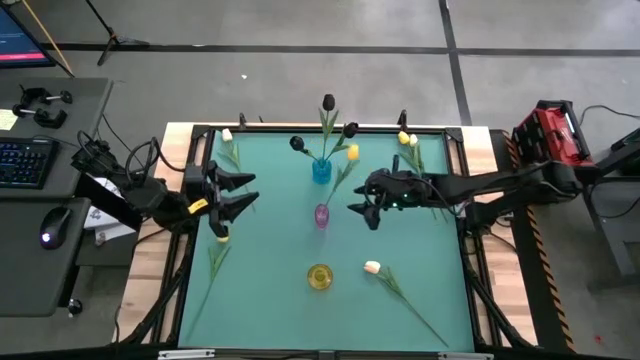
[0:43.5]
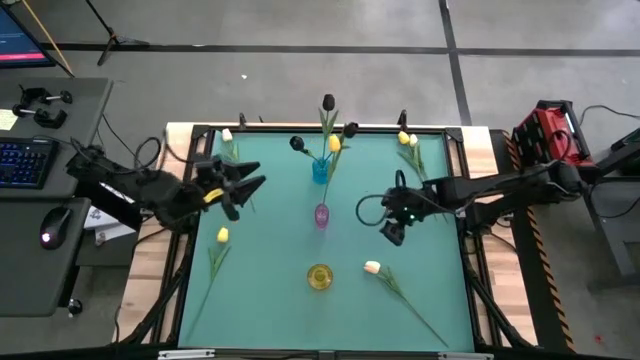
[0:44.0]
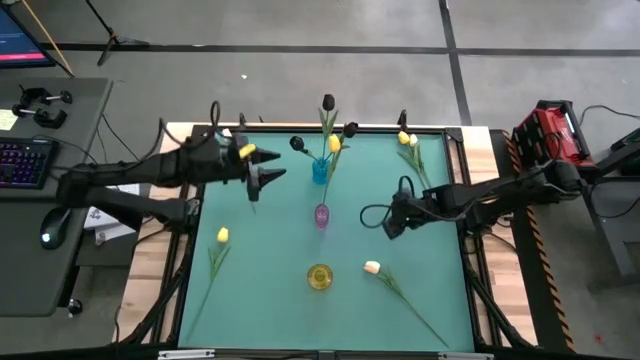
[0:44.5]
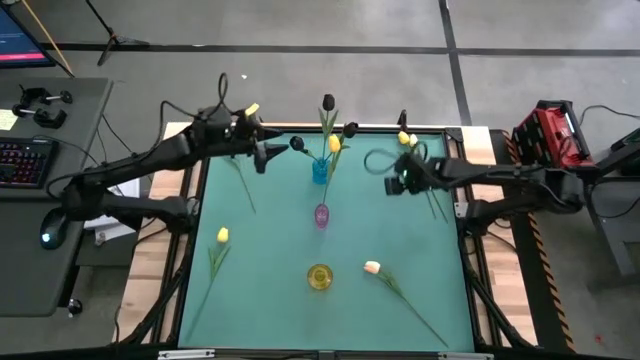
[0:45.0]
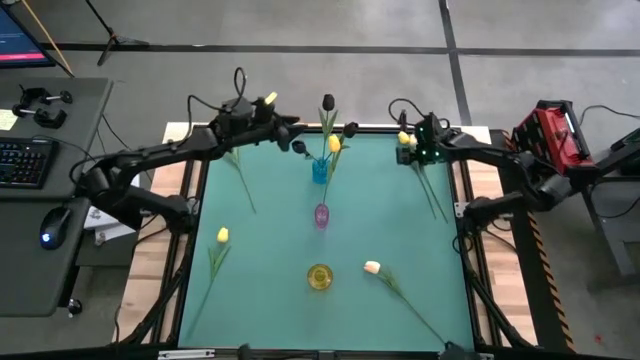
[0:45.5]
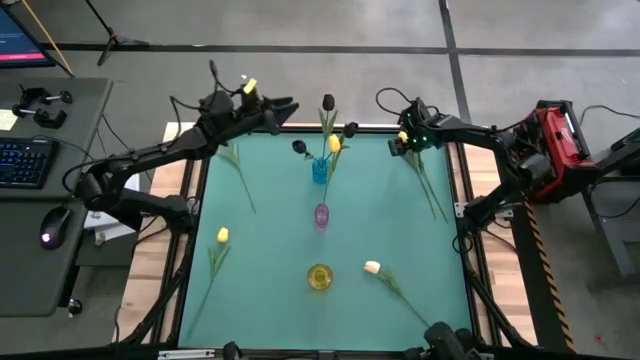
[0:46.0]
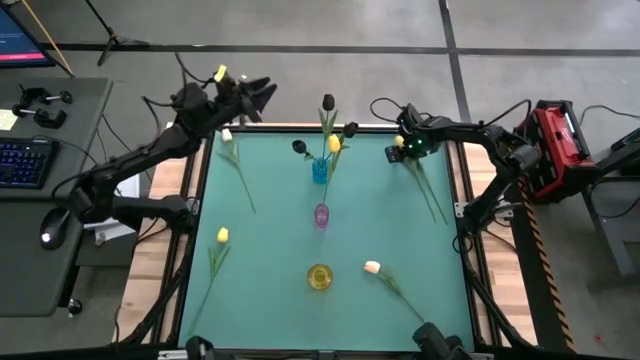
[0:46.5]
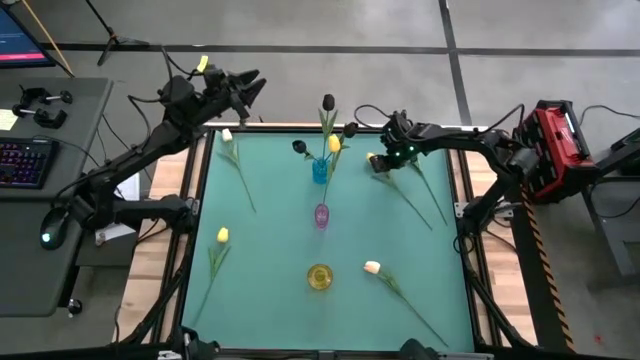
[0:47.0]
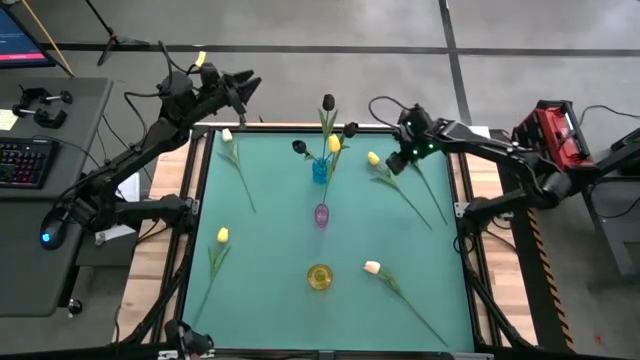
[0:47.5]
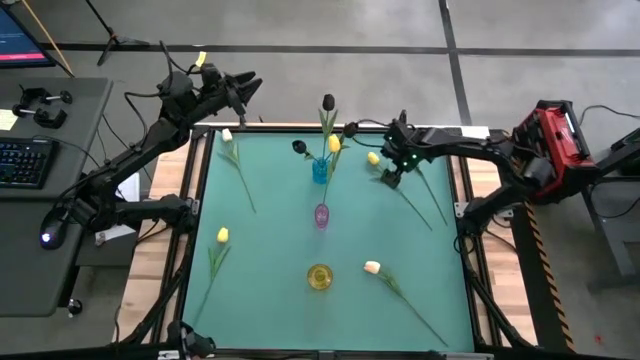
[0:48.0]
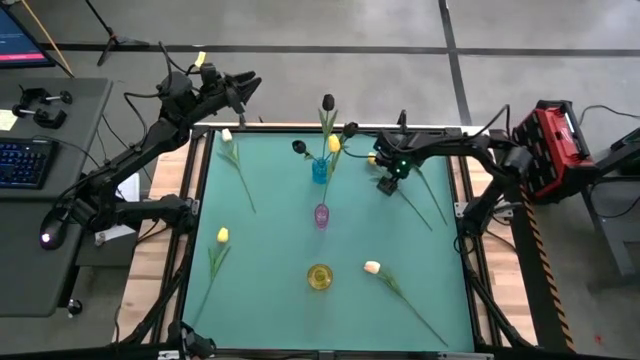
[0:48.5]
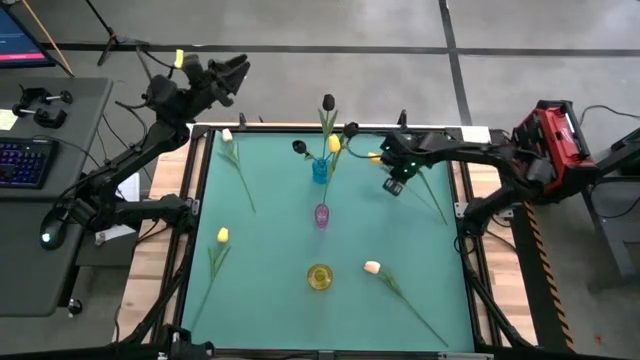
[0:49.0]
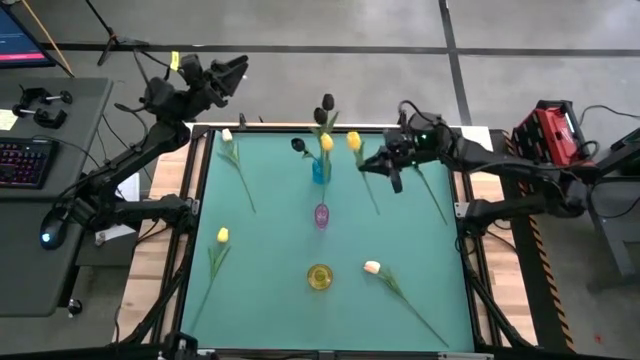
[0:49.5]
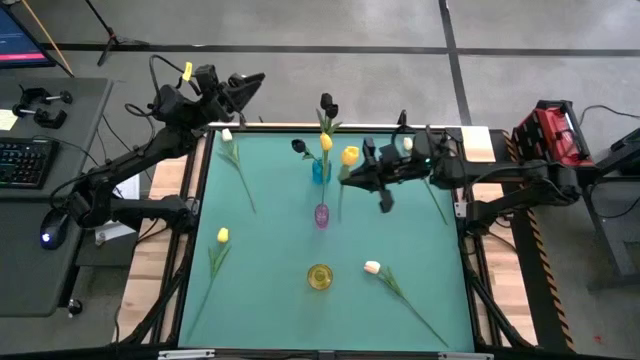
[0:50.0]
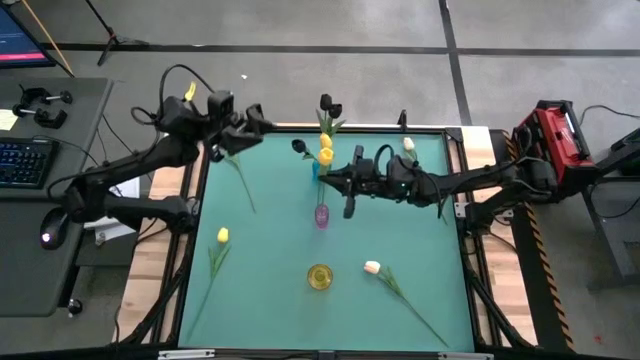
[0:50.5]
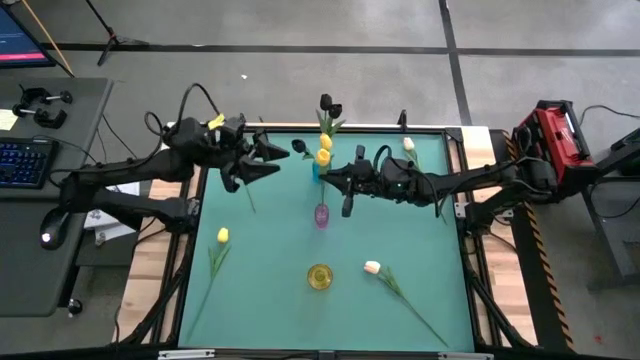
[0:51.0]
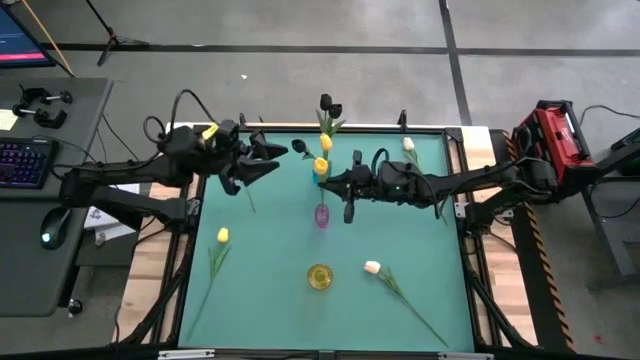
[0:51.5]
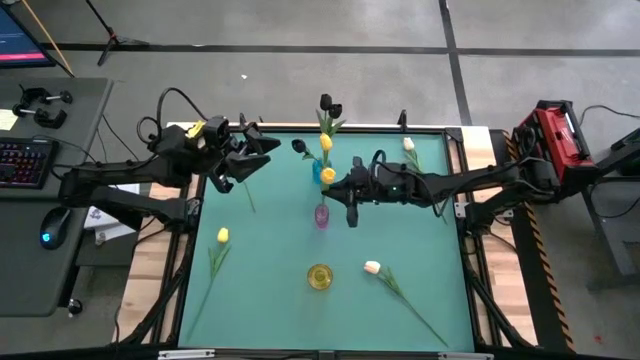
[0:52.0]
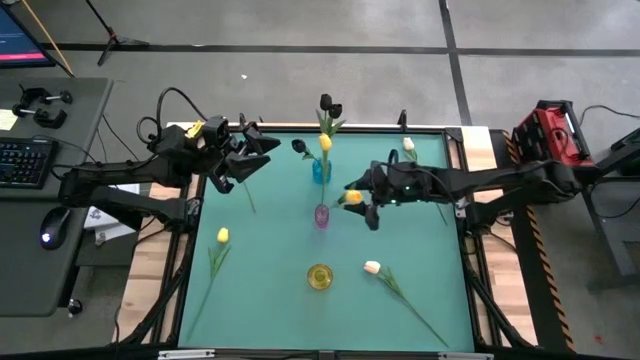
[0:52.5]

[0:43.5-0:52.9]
Task: Sort flowers into vase by color
Put the top yellow tulip into the violet vase

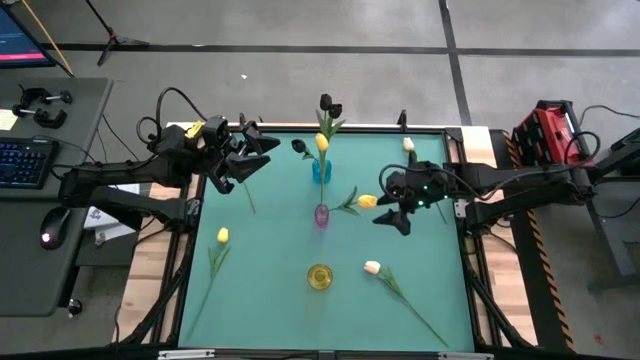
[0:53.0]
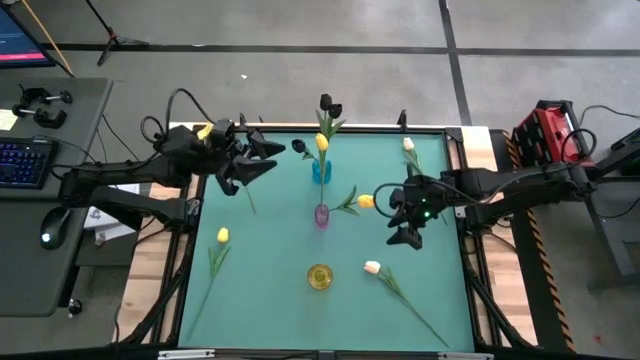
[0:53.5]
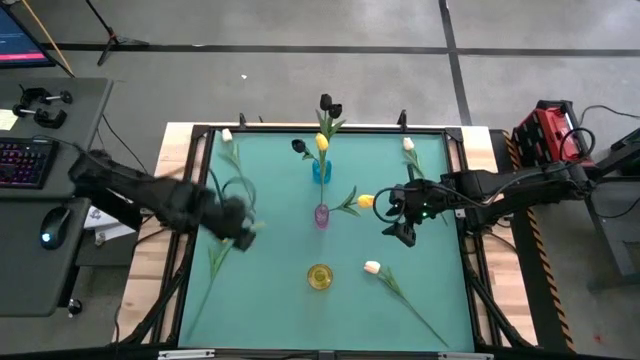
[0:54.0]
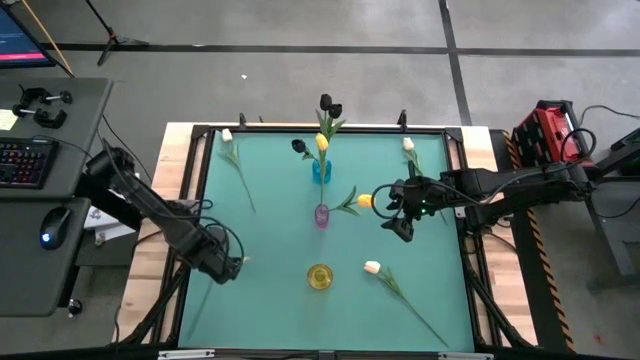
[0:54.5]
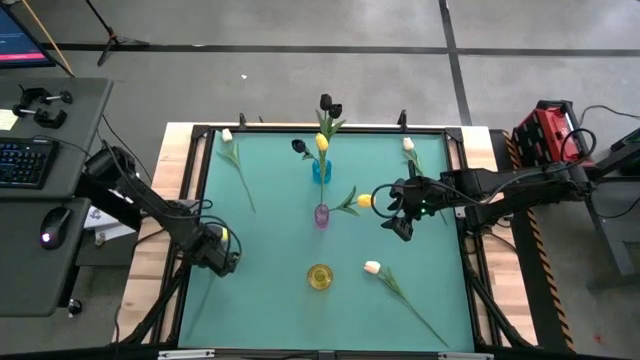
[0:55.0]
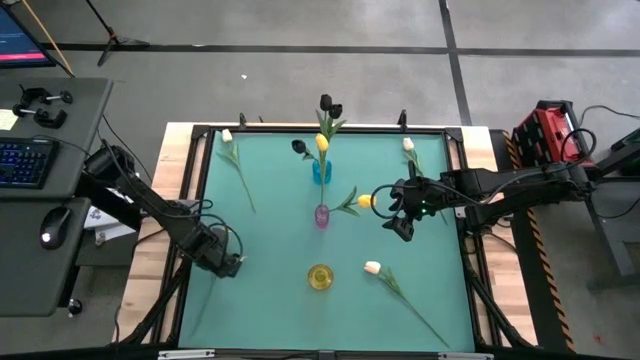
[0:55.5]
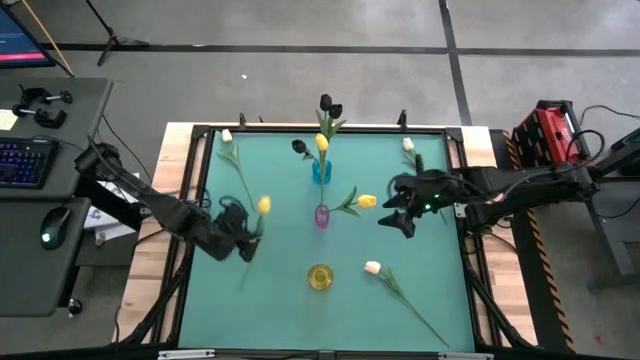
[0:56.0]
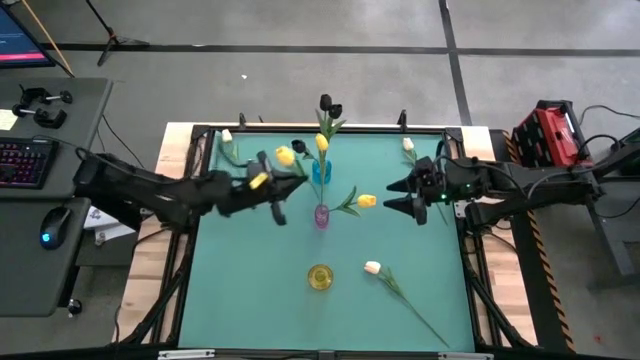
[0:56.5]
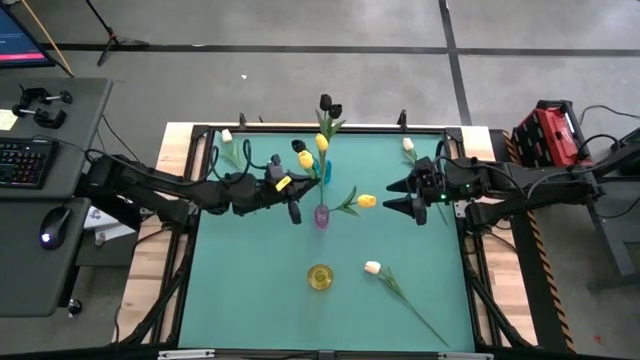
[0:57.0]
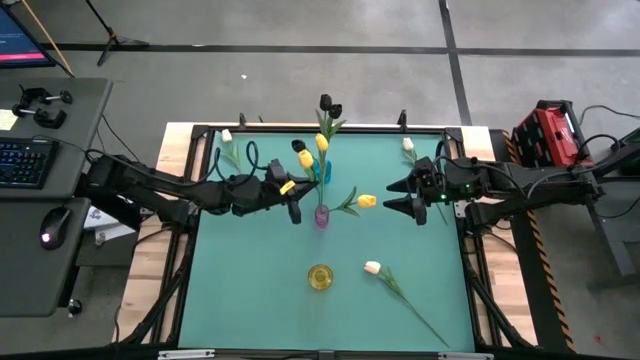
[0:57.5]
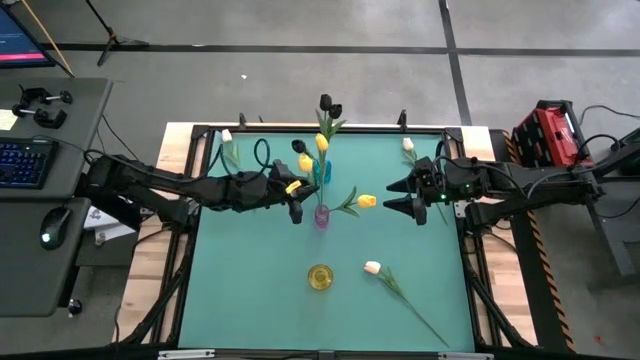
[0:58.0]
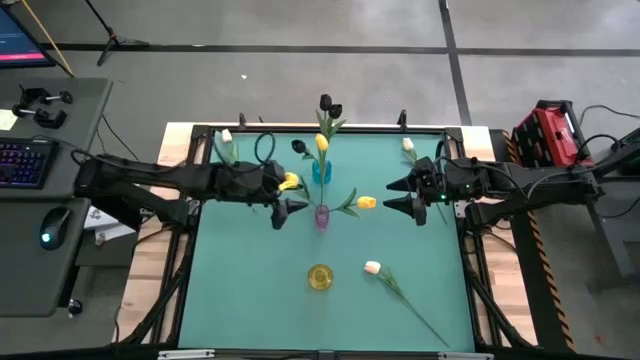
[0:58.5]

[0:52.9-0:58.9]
Put the yellow tulip into the violet vase

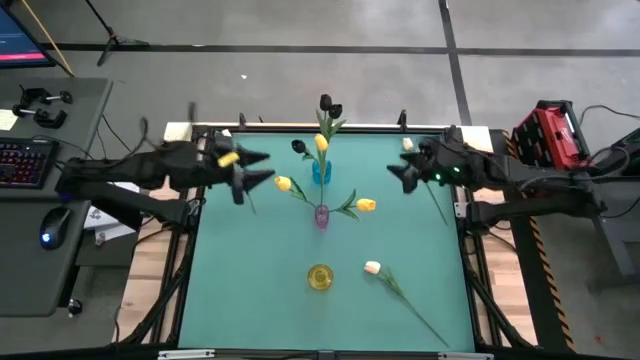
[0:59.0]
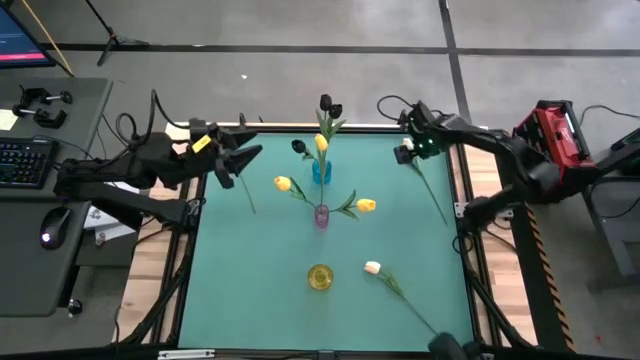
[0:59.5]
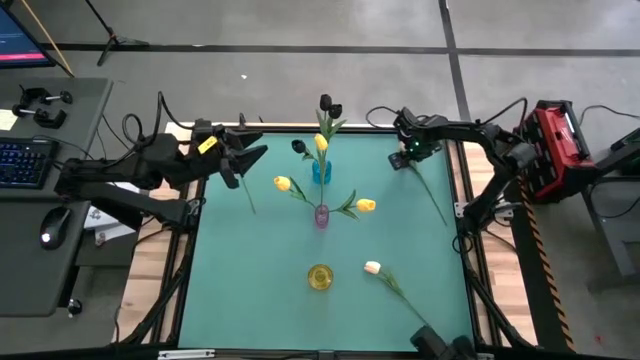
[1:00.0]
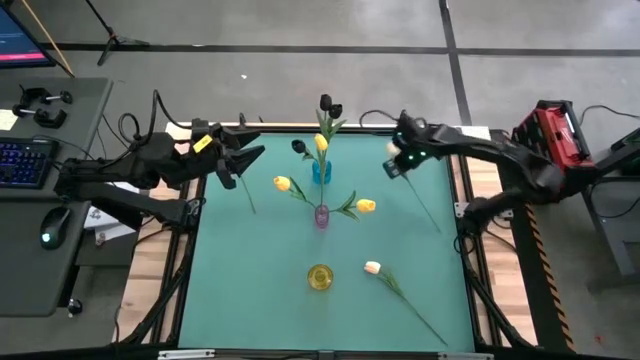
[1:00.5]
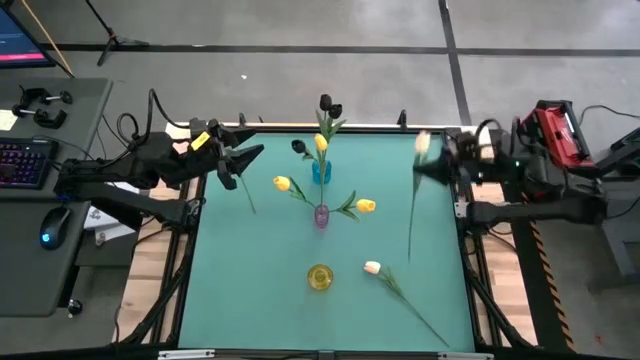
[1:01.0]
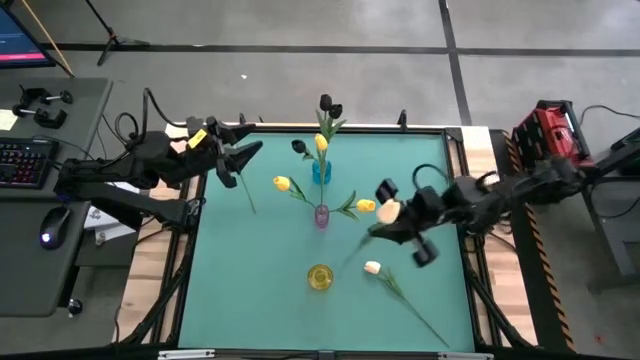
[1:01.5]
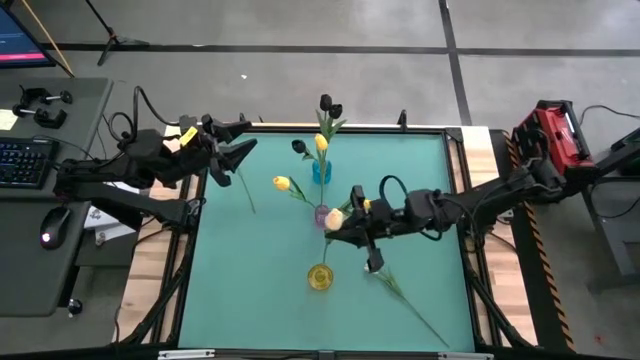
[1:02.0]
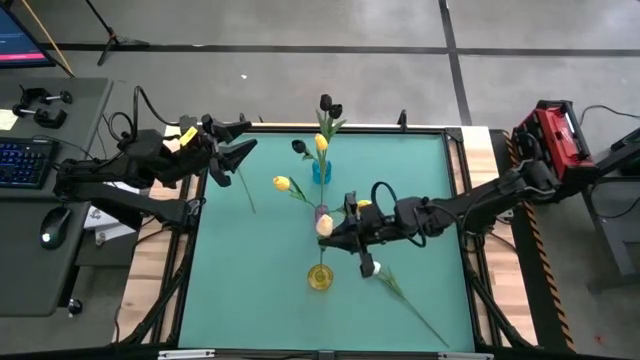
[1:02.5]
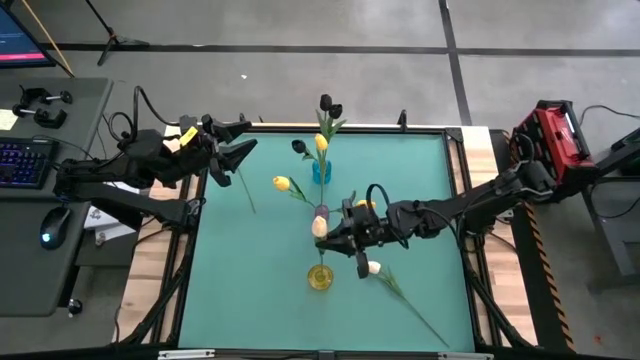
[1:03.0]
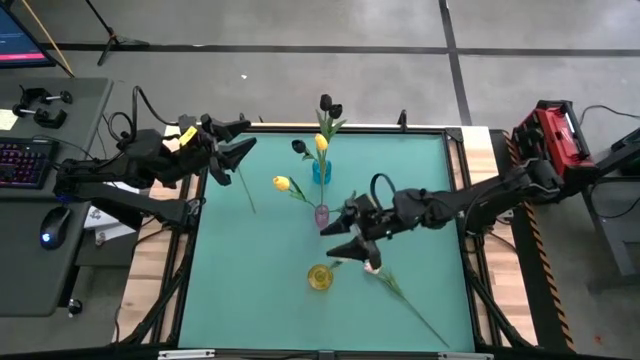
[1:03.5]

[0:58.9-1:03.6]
Put the top right white tulip into the yellow vase

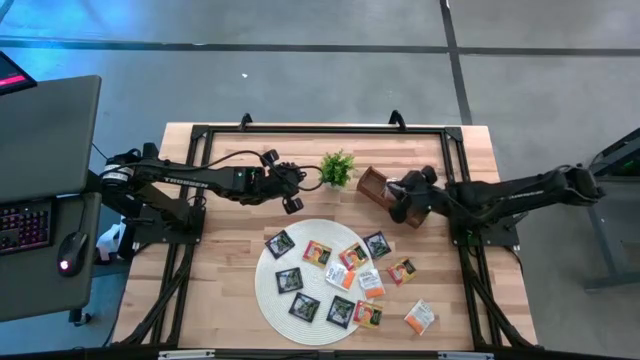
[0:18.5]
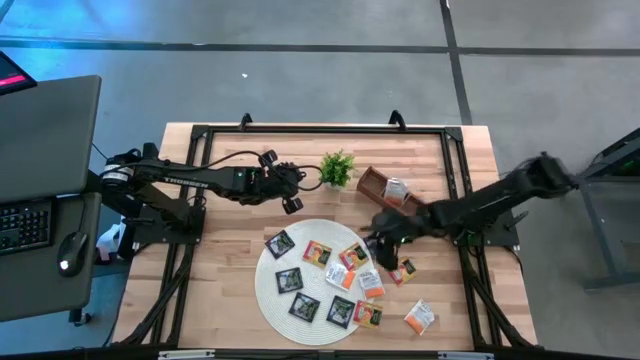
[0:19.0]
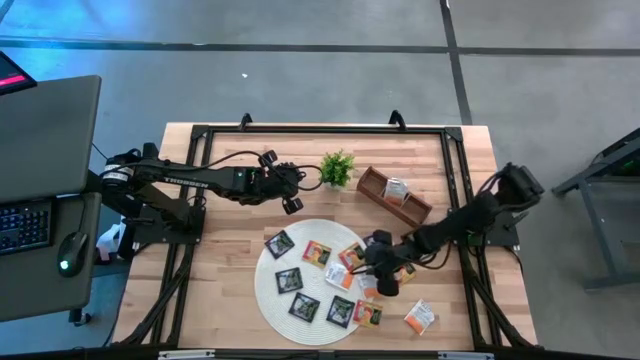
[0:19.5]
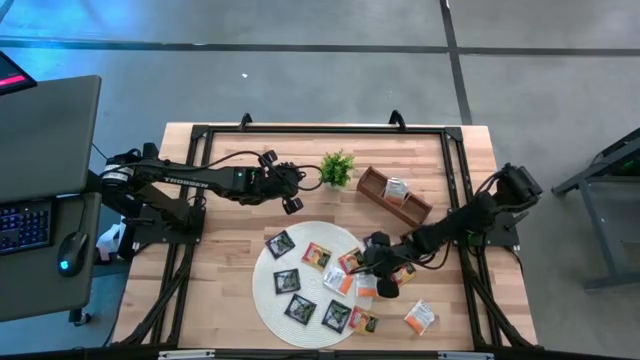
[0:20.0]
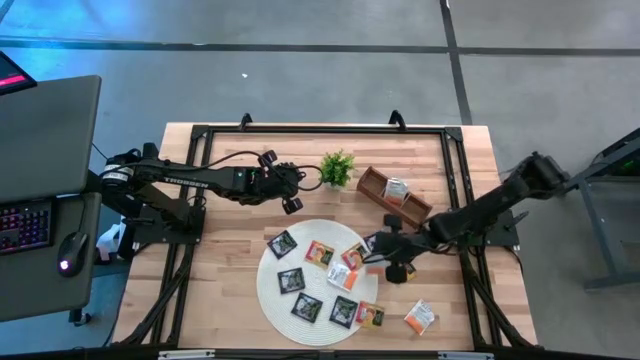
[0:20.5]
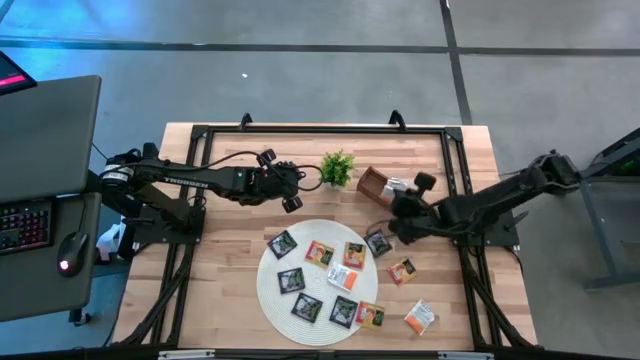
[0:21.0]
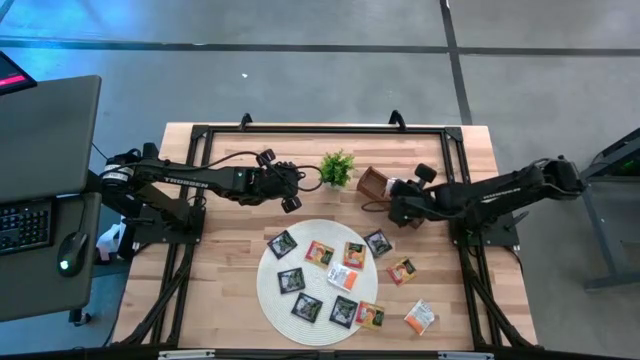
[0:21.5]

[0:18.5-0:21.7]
Task: Pick & Place Tea
Put the white tea bag into the middle section of the wooden organizer
